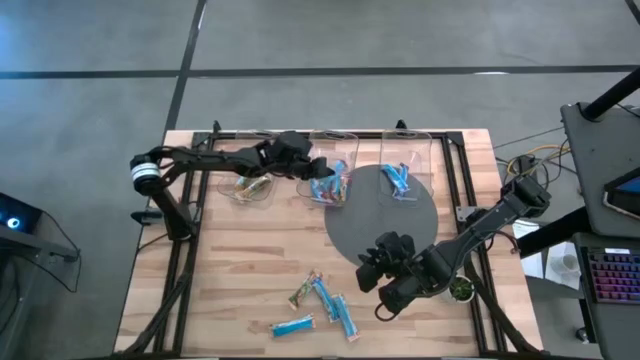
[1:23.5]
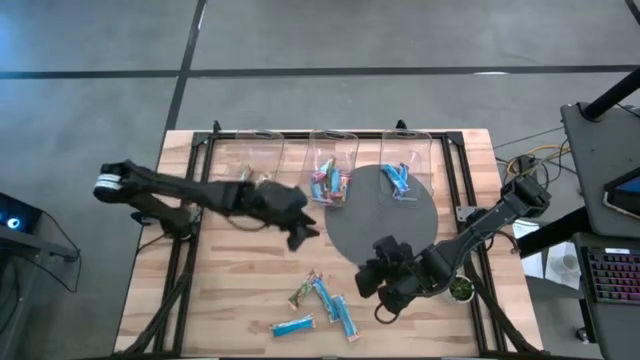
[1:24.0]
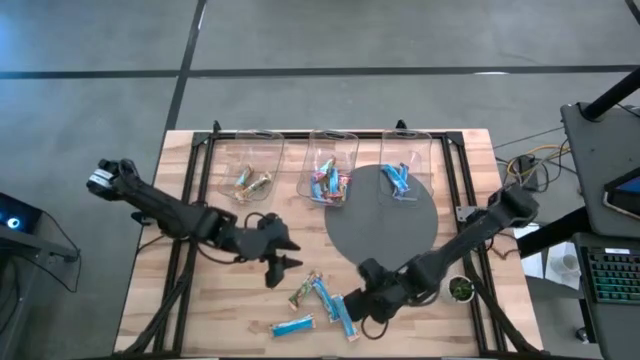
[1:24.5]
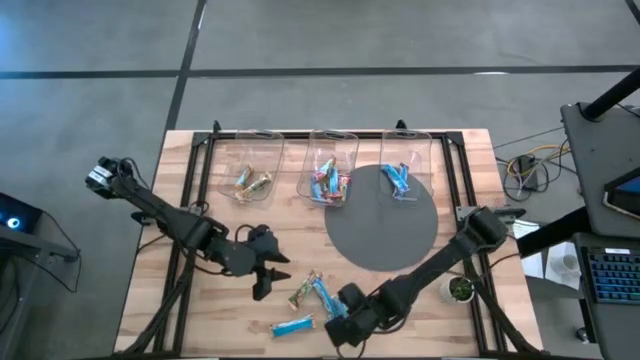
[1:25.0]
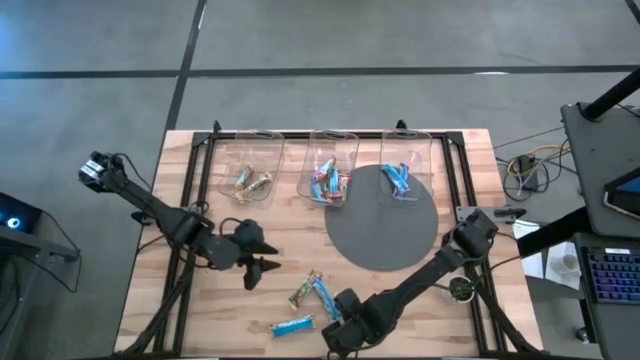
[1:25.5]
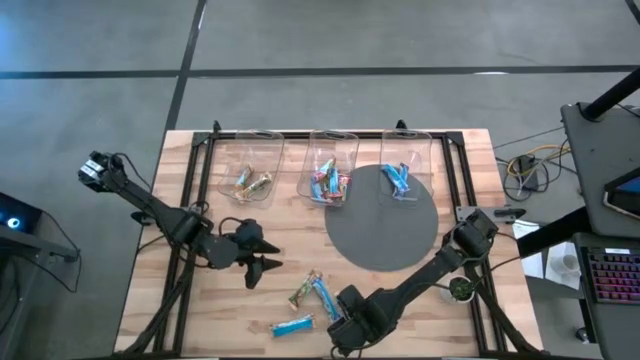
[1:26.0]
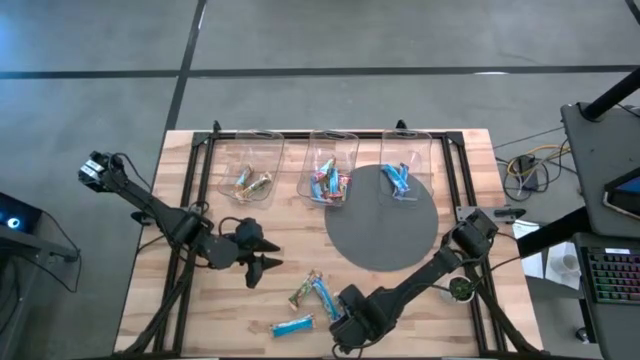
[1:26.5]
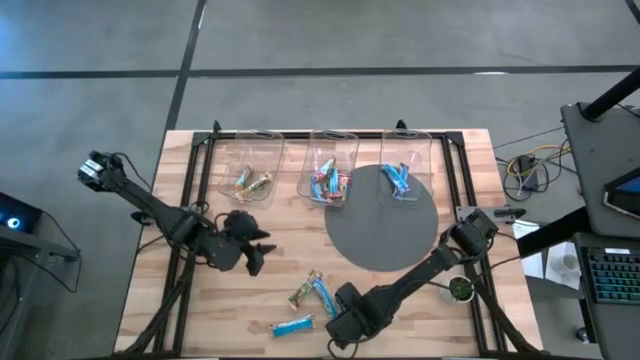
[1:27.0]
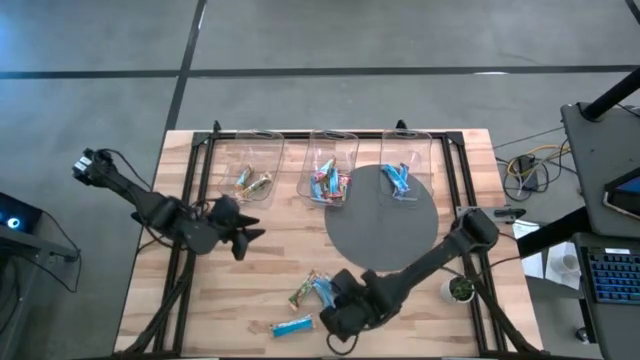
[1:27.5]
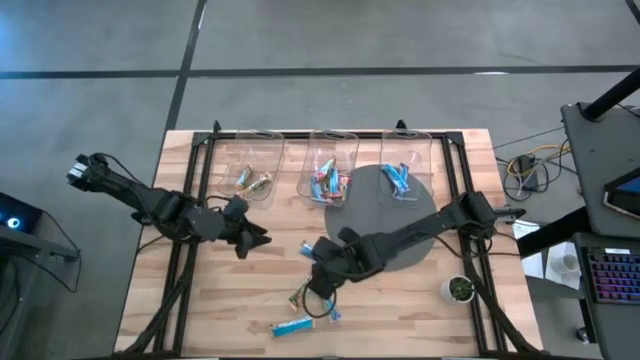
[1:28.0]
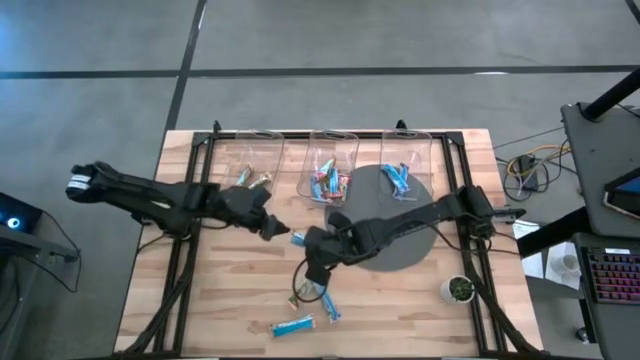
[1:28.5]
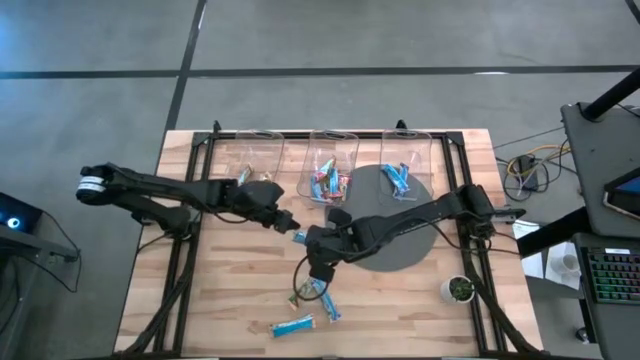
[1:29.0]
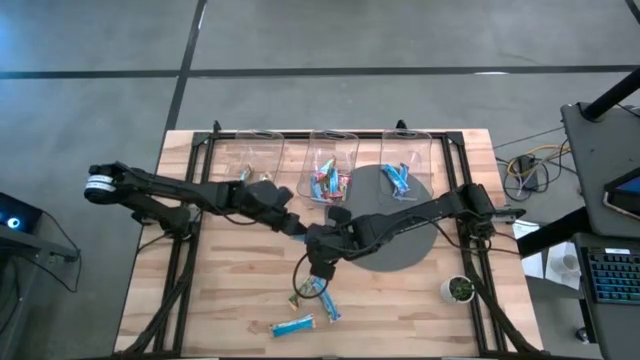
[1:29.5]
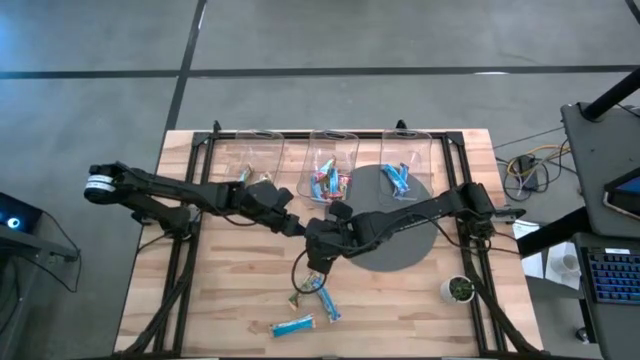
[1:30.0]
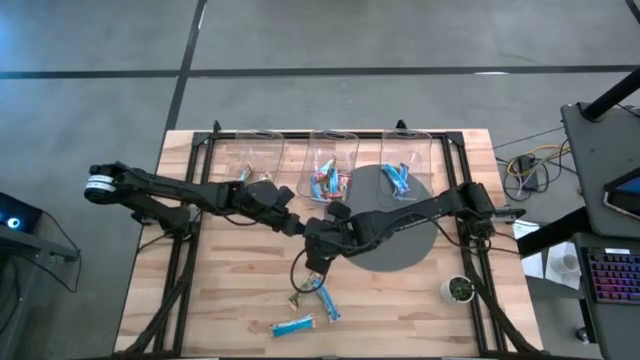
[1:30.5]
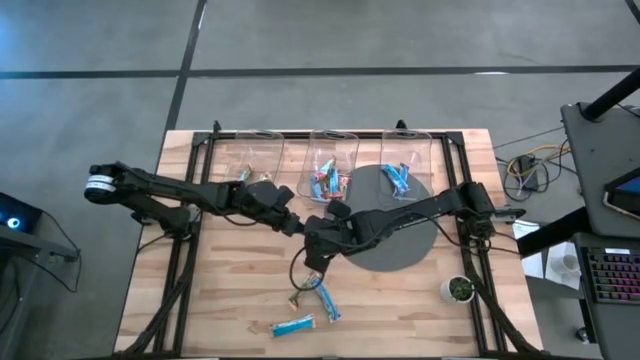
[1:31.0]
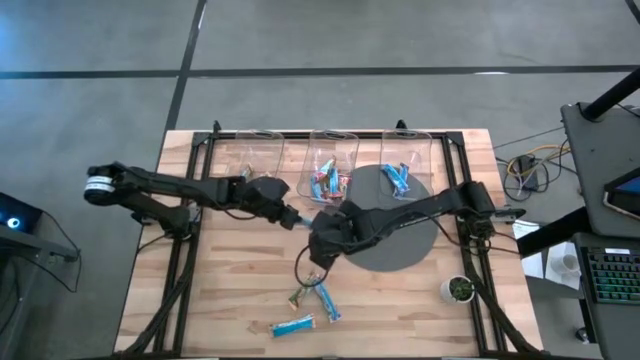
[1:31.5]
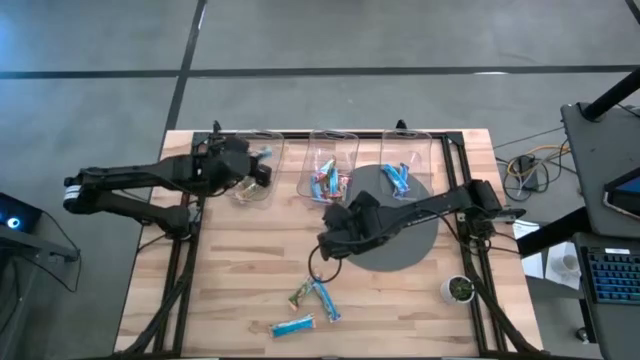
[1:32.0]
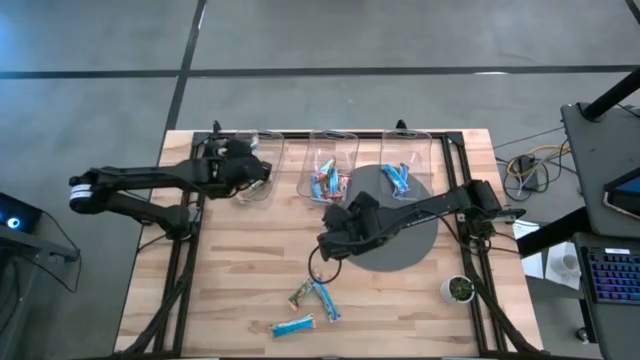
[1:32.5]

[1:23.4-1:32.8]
Task: Pick and place Granola Bars by type
Put the yellow granola bar into the left transparent bin

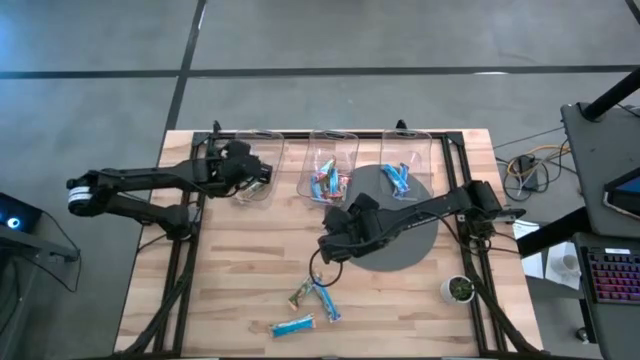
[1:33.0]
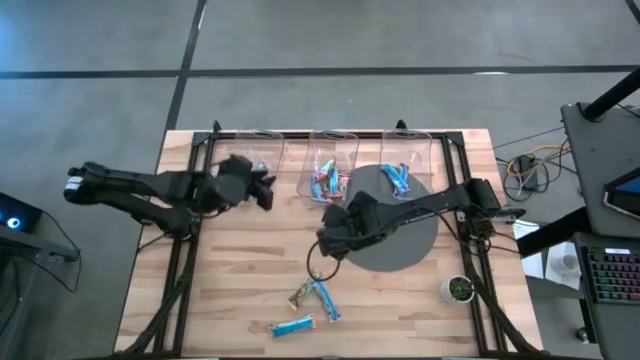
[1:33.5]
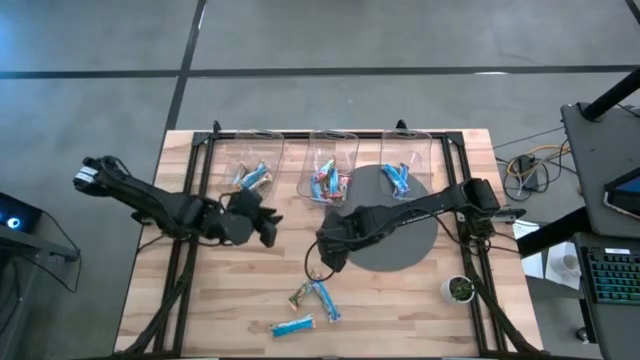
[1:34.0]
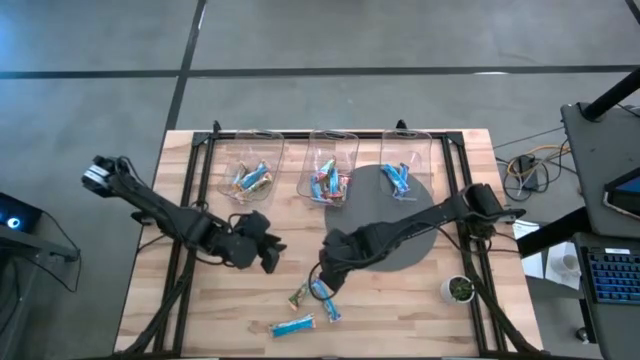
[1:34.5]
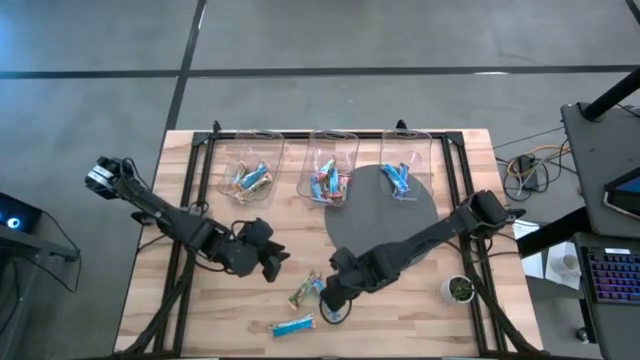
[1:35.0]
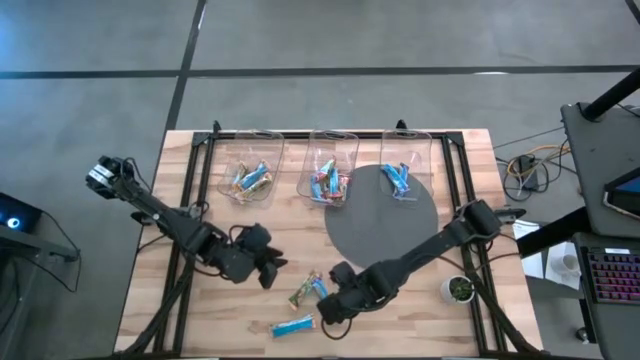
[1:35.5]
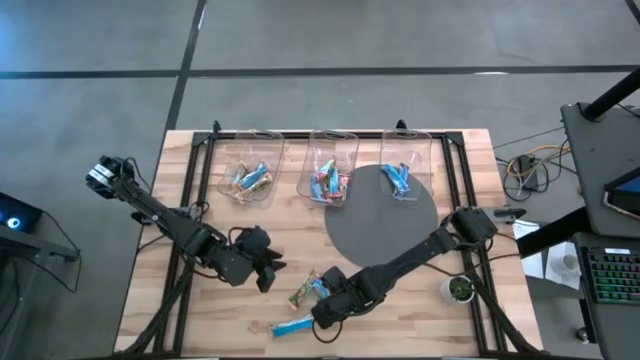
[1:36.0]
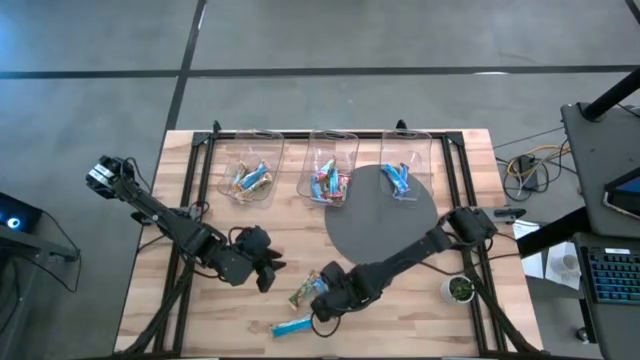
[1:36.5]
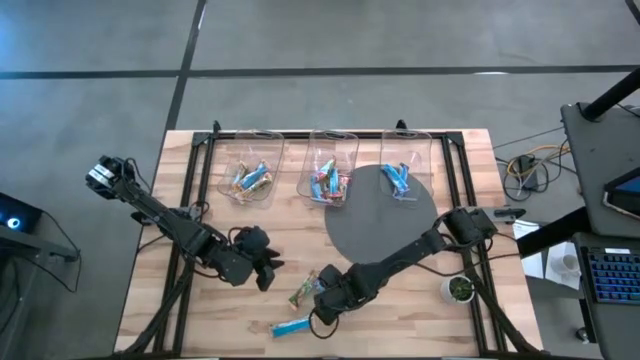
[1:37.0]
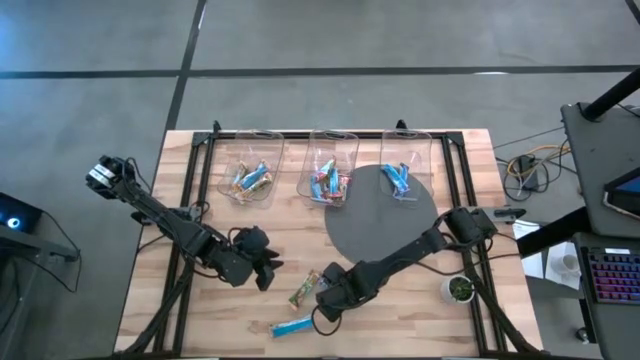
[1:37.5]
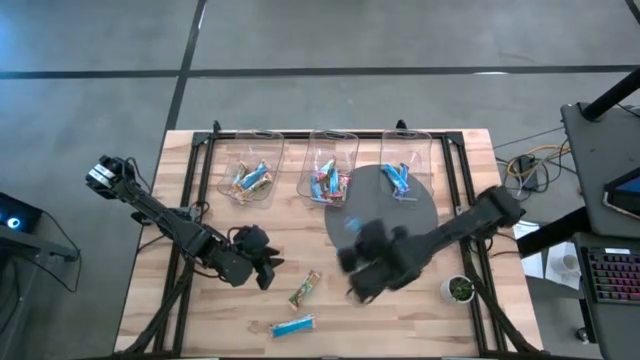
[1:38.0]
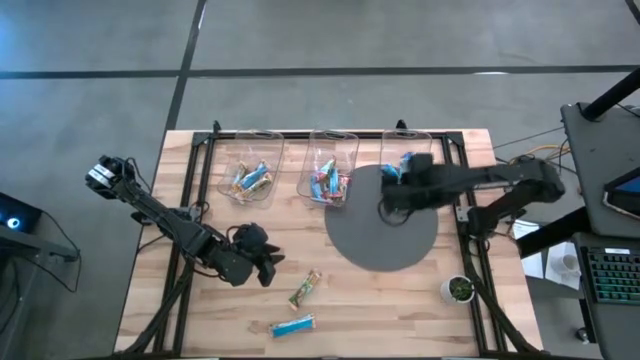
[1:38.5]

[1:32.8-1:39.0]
Put the blue granola bar into the right transparent bin

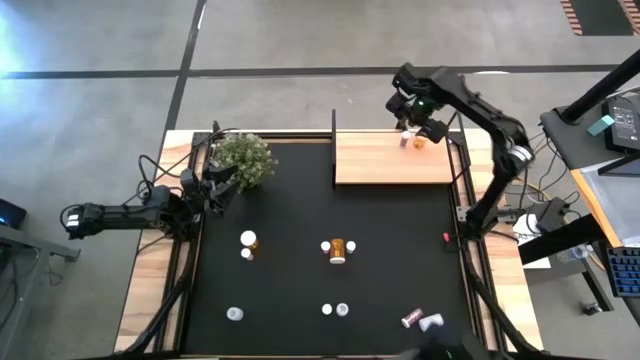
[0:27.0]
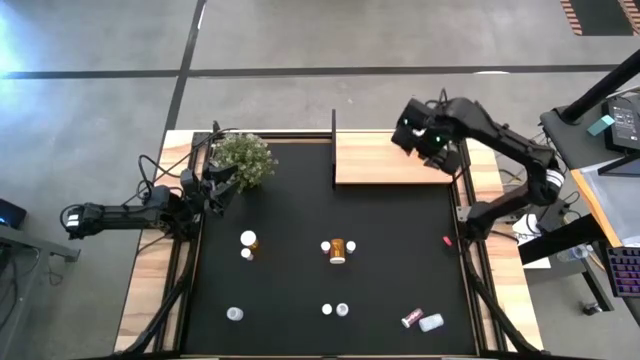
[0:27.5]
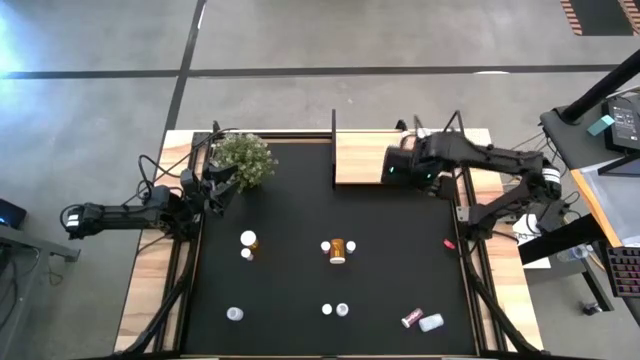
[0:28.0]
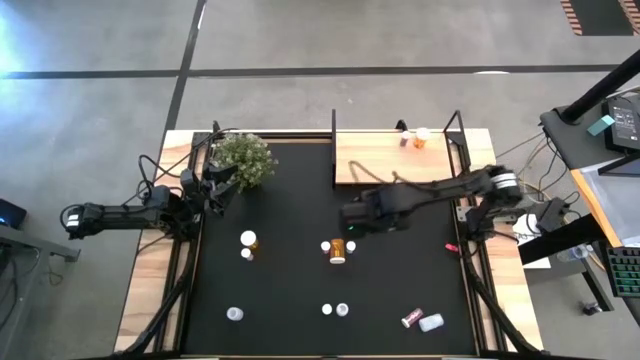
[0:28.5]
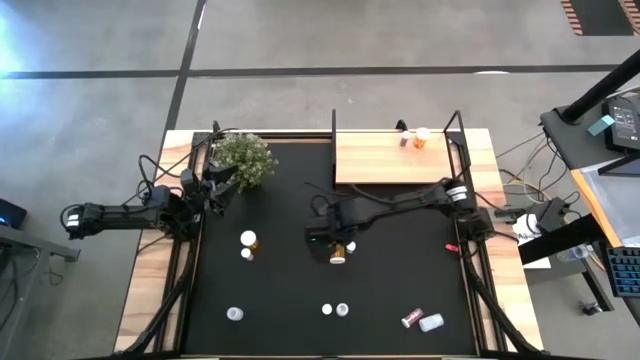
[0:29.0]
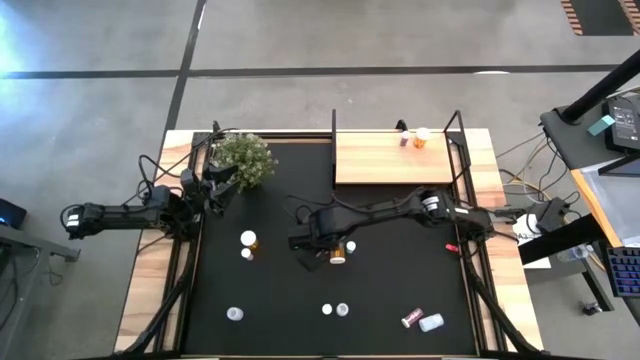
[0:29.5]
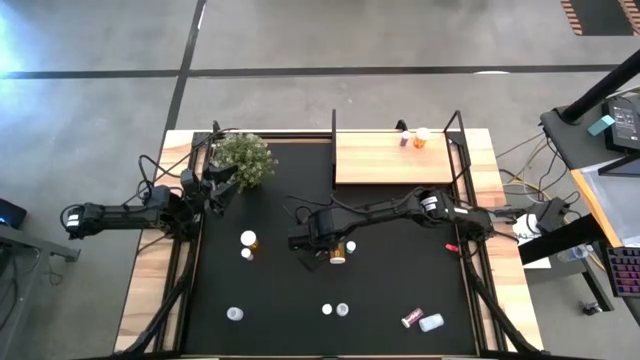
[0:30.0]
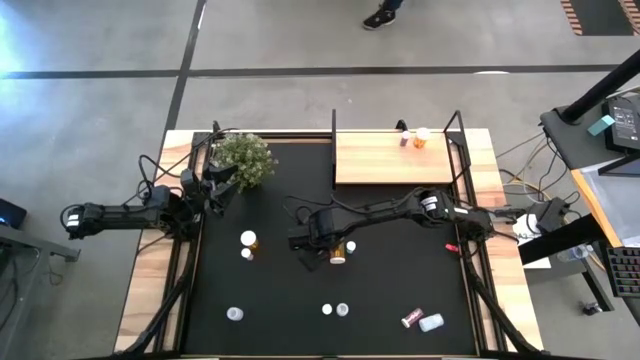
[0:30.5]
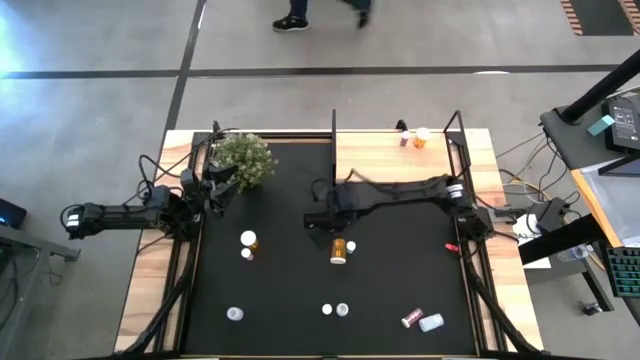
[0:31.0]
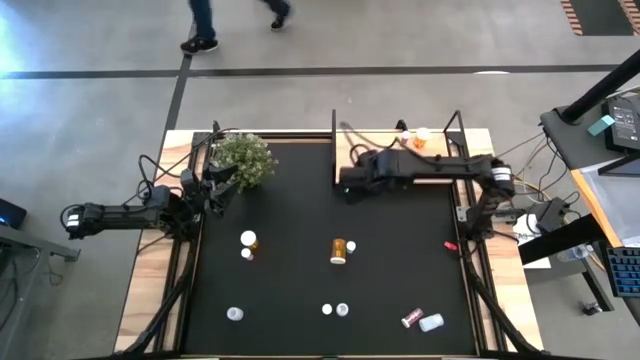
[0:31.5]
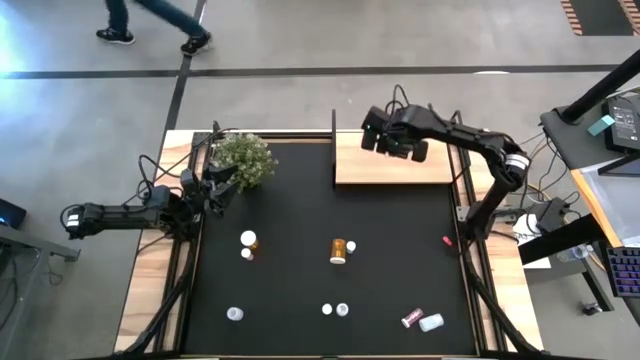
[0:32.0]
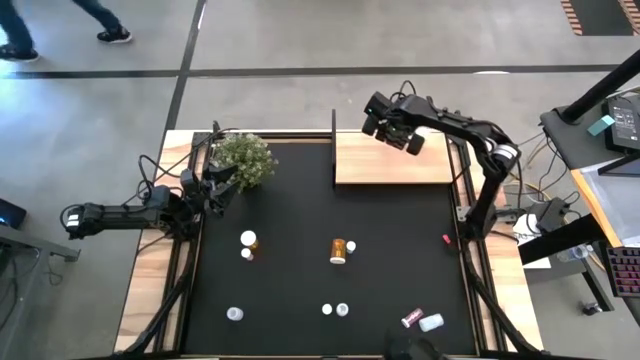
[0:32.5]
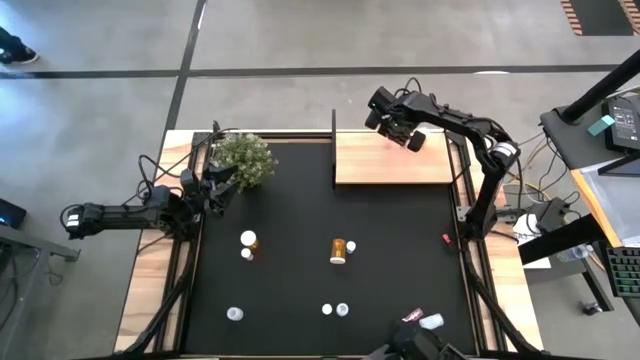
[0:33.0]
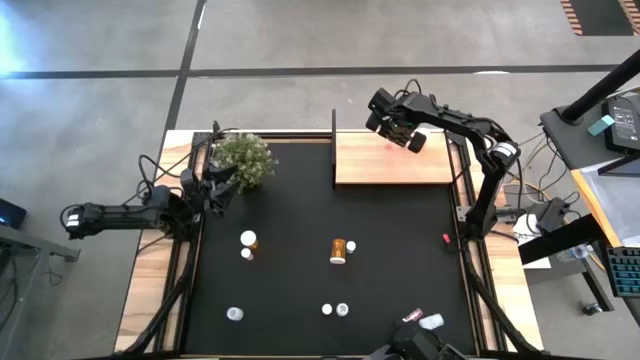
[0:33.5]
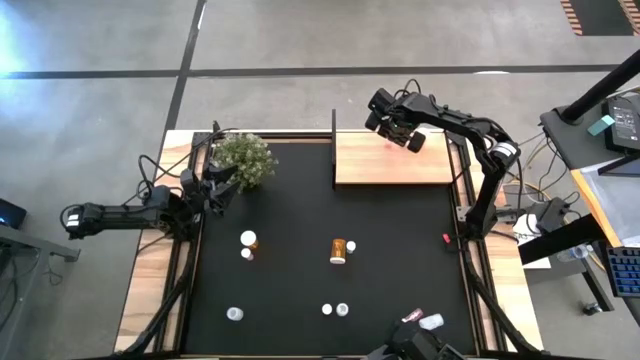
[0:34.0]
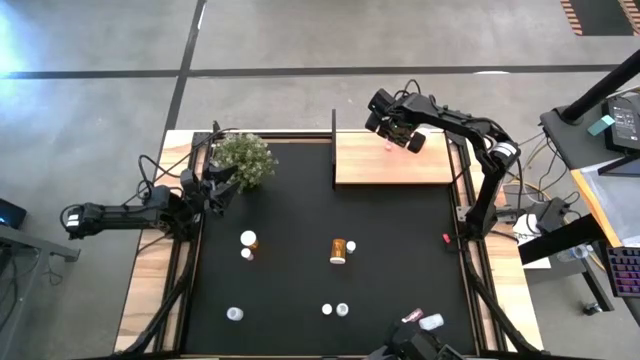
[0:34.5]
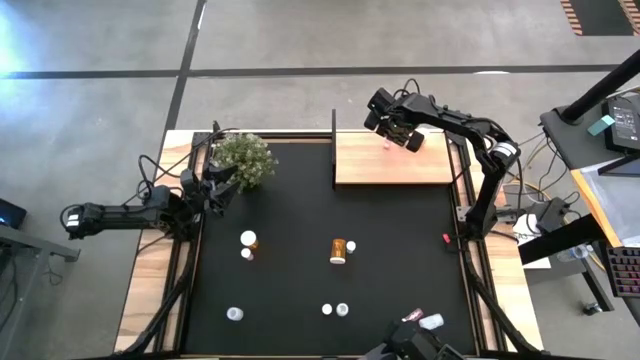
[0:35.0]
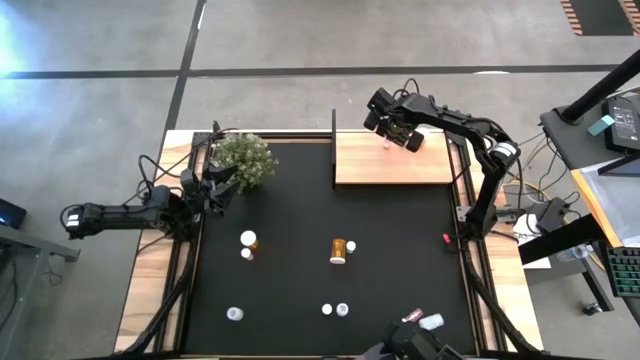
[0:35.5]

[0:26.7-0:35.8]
Task: Pick and place medicine bottles onto shelf by color
Put the top left pink pill bottle on the shelf
